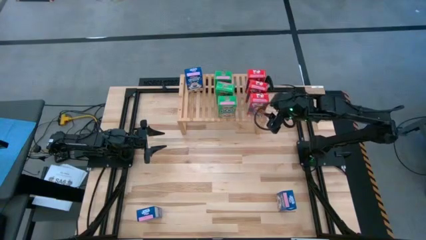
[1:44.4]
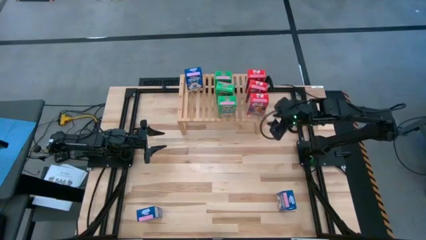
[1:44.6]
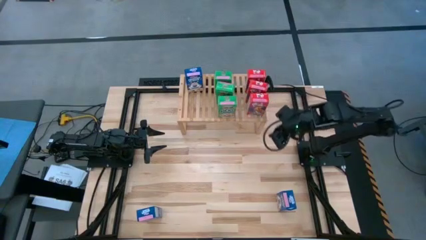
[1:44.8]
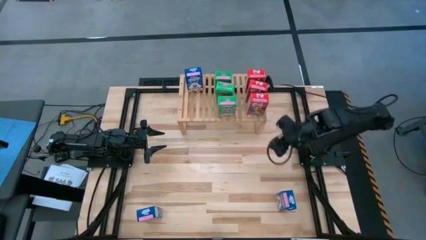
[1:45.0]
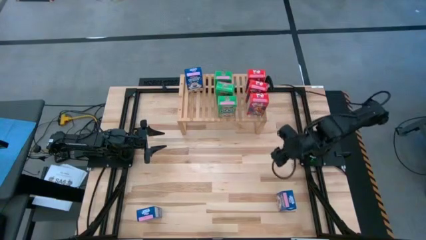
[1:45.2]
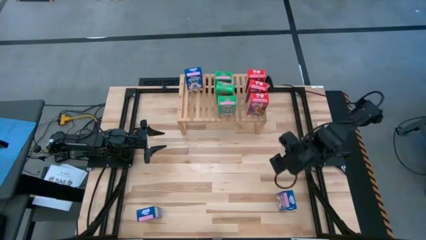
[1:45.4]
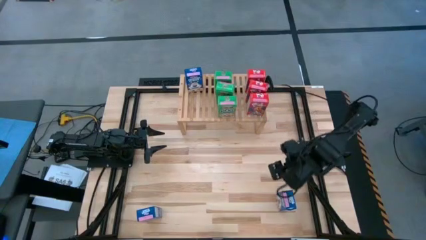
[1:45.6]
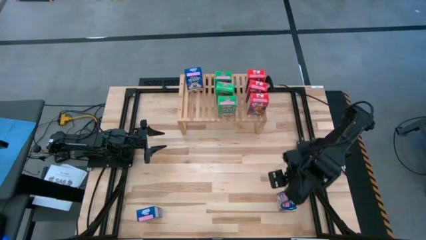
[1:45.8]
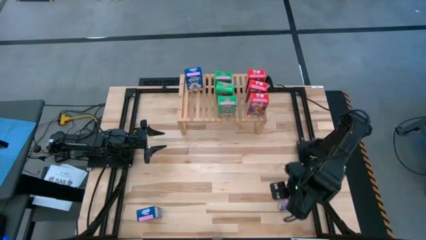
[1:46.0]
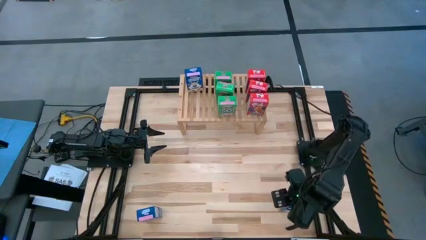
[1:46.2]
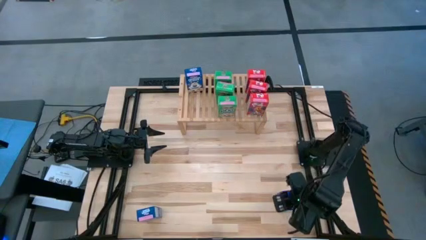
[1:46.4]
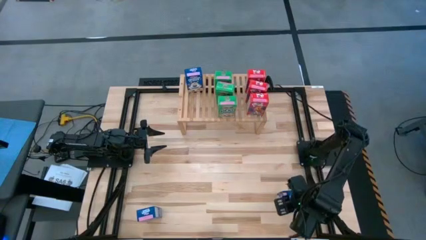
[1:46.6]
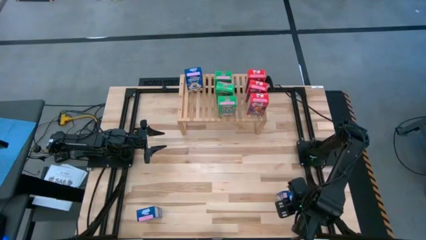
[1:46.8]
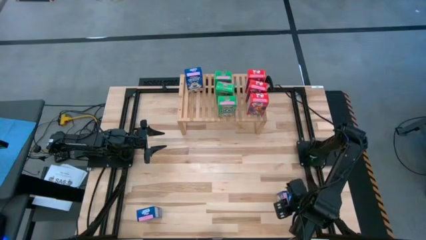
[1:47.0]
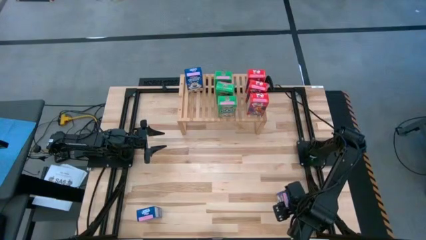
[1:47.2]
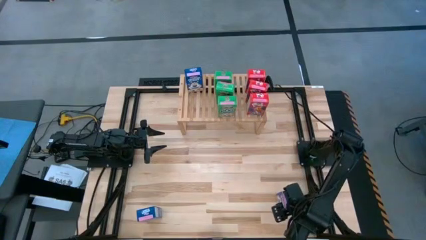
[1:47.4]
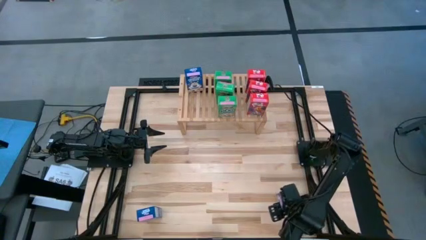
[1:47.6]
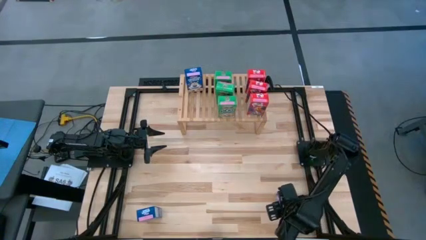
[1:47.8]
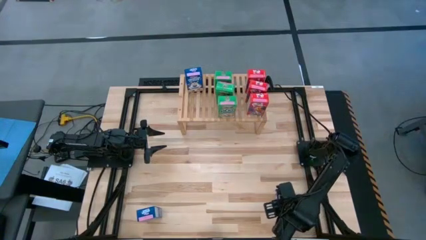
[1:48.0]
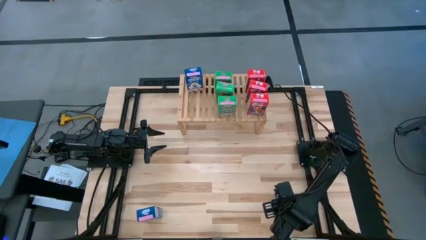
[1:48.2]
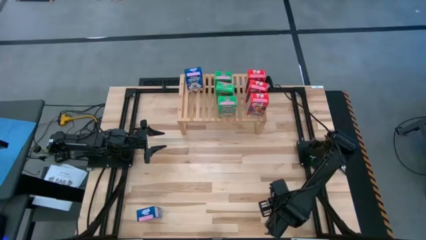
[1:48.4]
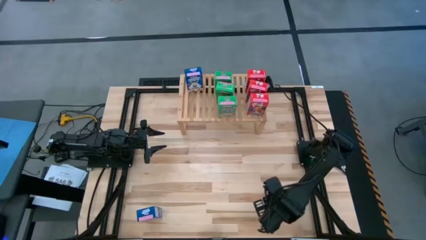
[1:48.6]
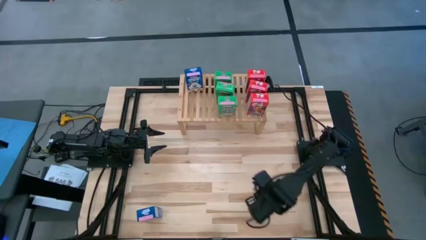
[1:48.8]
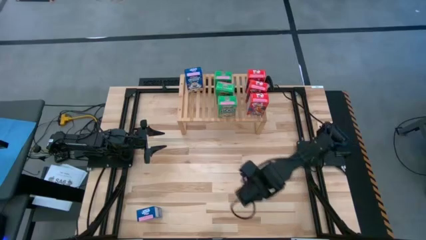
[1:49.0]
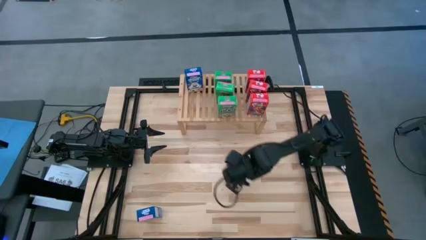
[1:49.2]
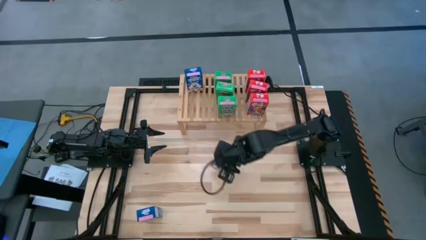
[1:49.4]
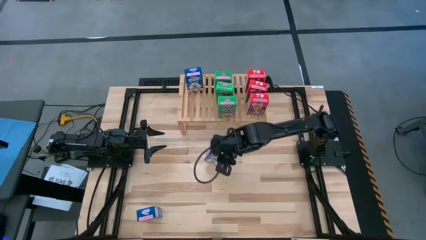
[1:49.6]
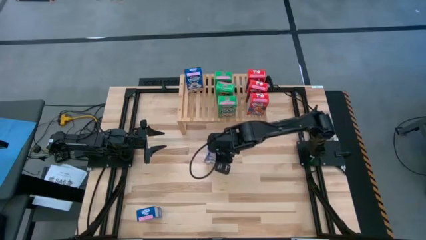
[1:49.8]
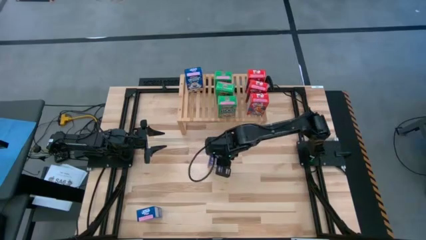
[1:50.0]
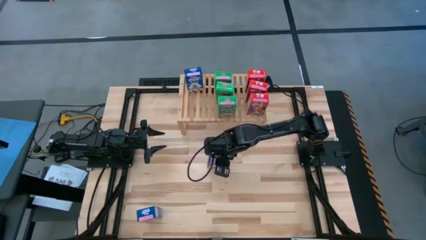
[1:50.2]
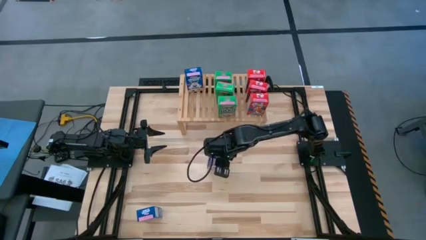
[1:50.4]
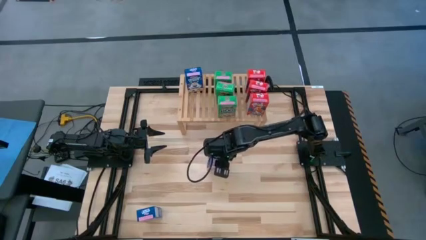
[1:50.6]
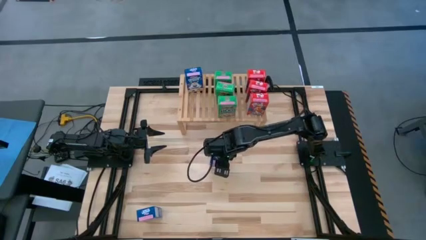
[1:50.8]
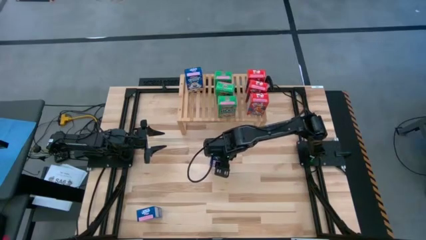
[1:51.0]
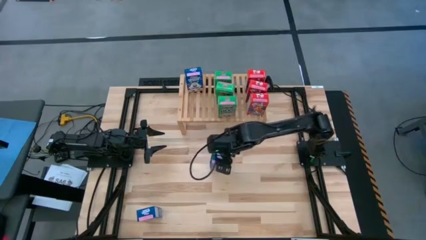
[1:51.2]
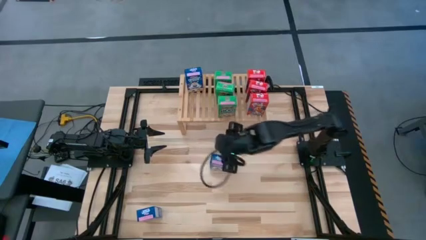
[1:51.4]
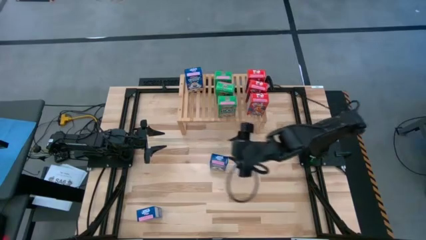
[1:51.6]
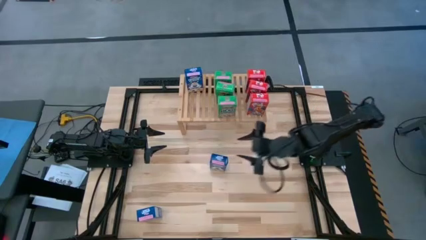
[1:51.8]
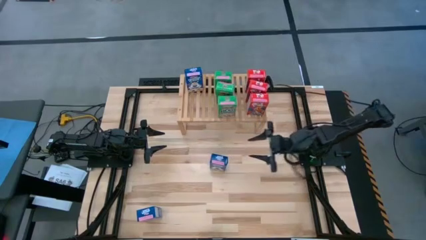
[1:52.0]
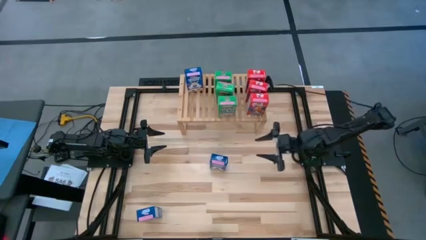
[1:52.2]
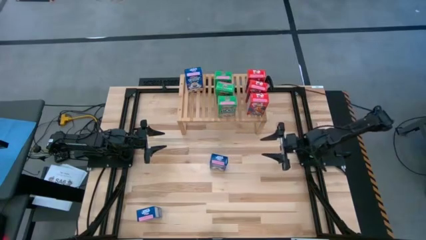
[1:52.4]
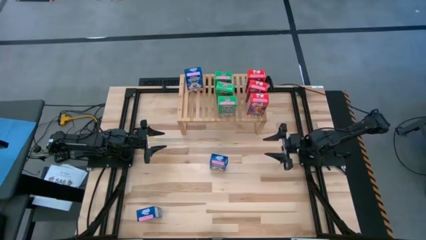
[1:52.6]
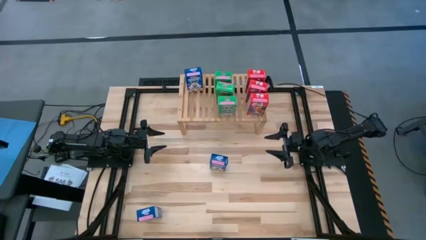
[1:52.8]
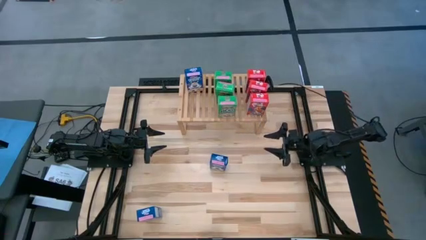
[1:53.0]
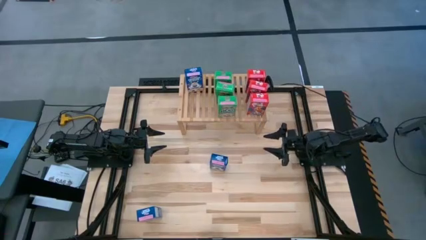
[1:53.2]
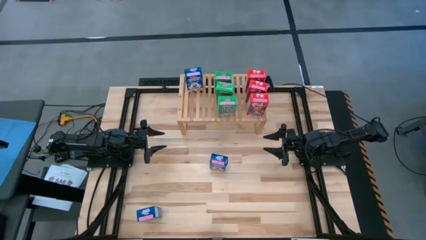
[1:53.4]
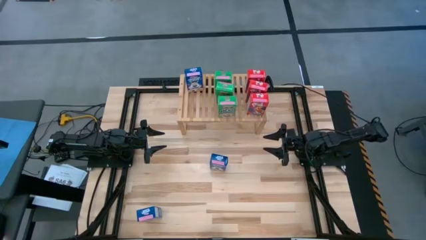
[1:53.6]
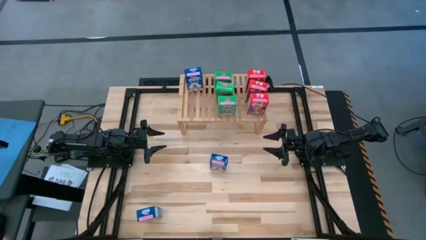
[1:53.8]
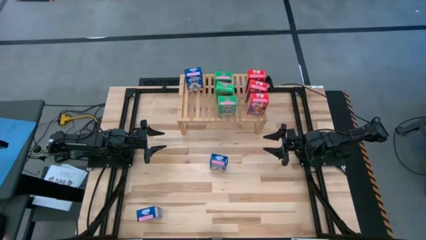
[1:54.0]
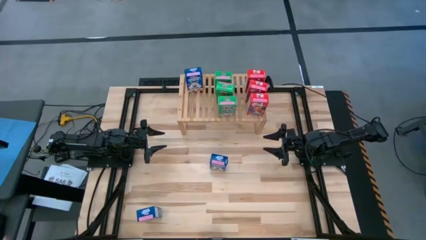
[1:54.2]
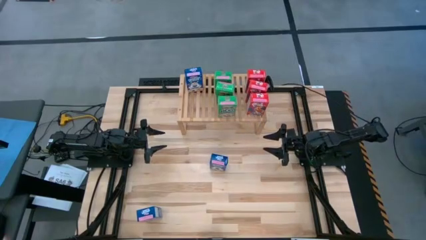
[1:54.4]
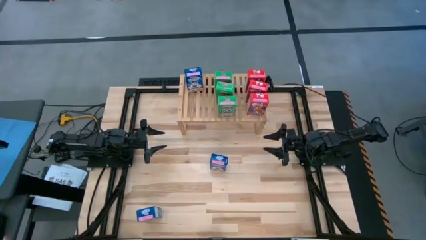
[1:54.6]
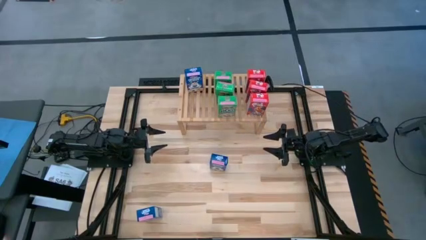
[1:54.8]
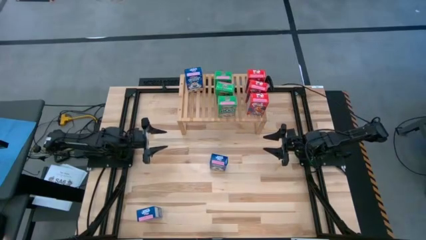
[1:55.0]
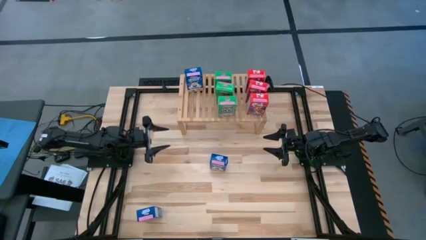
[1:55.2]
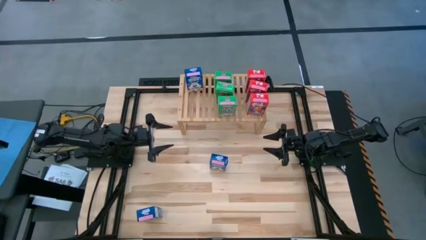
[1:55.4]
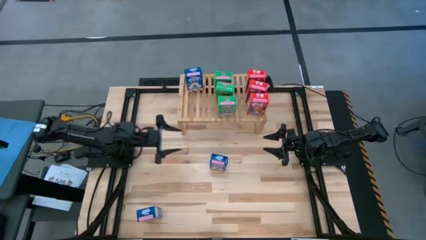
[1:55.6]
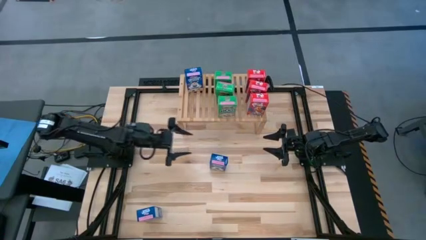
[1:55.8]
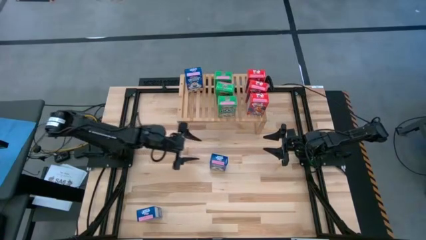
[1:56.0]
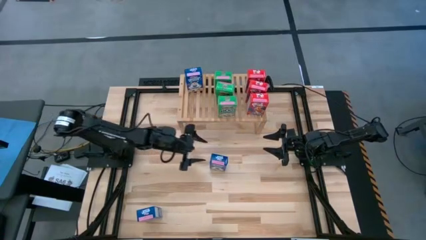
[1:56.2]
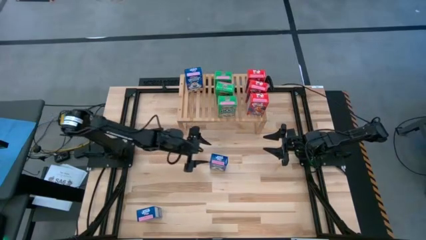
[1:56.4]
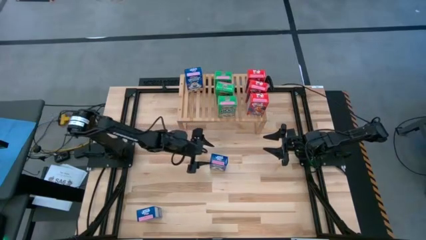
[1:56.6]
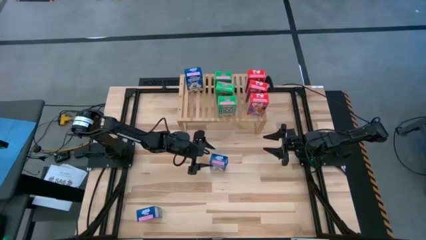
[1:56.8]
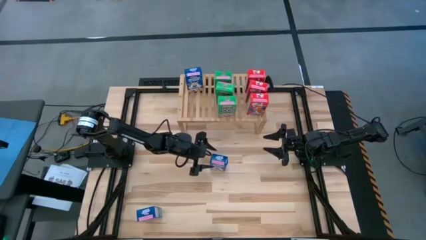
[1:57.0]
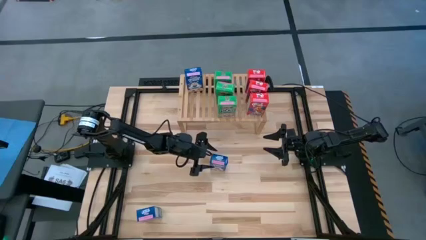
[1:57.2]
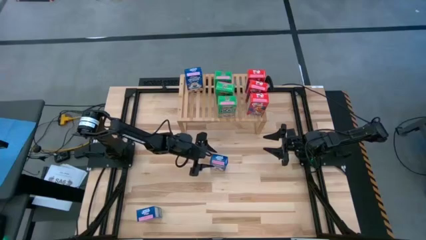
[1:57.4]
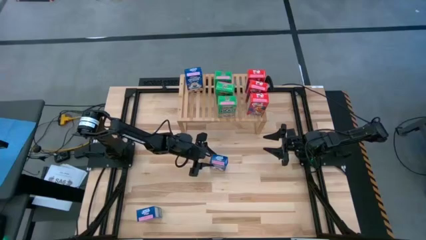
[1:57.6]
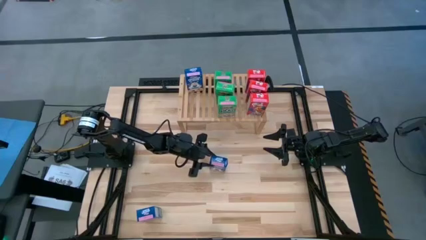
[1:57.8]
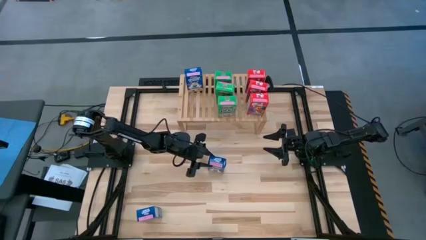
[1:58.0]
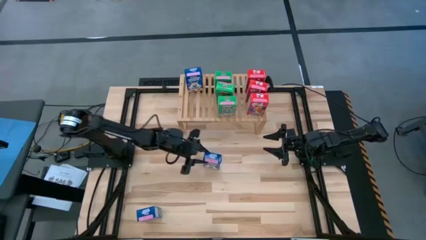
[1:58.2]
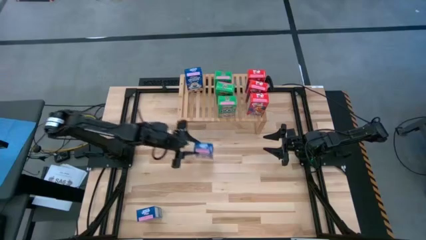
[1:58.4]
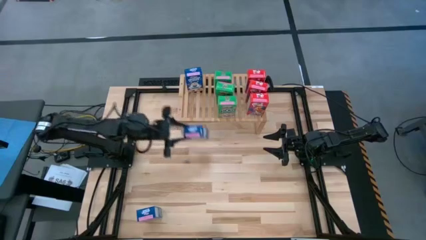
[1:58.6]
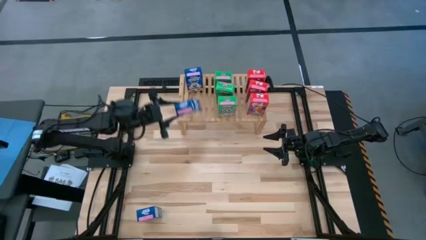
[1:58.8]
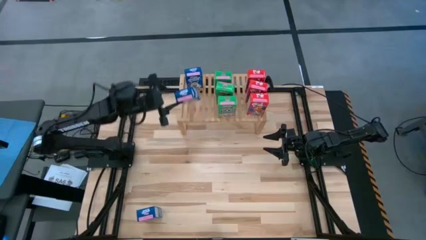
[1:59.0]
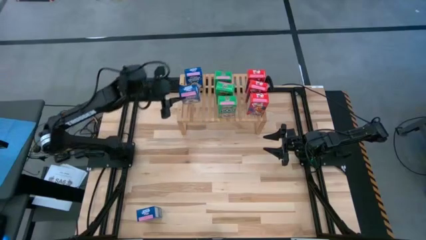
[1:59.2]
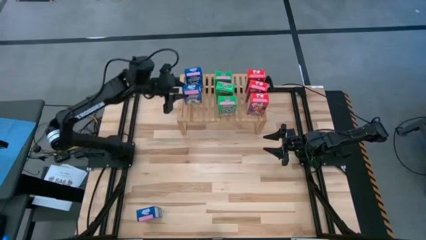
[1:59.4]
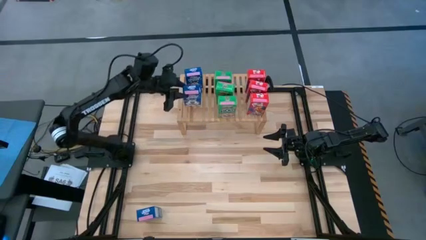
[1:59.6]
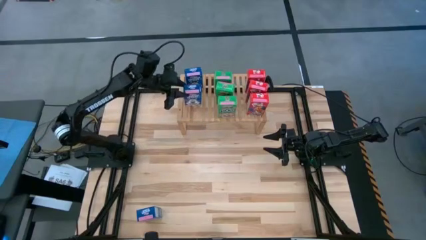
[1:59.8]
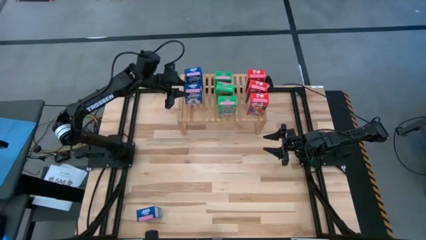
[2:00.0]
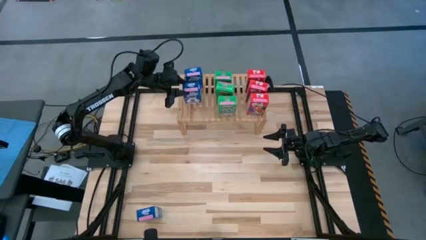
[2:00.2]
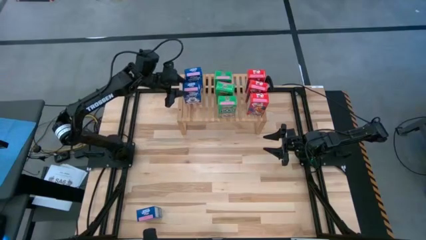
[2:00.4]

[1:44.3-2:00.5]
Task: Stack cereal on shelf
Put the right blue cereal box on the shelf aligned with the other blue cereal box

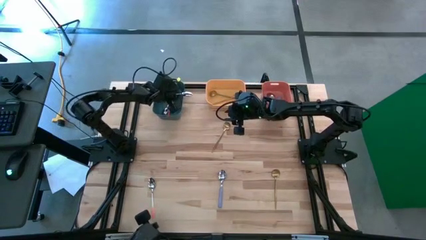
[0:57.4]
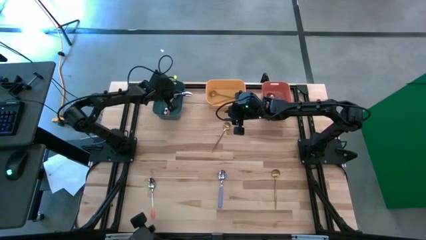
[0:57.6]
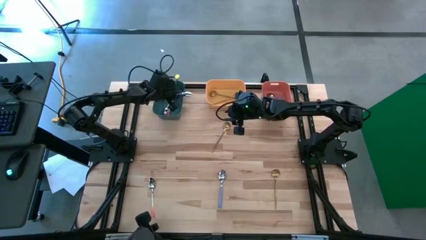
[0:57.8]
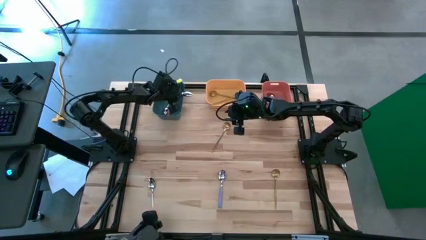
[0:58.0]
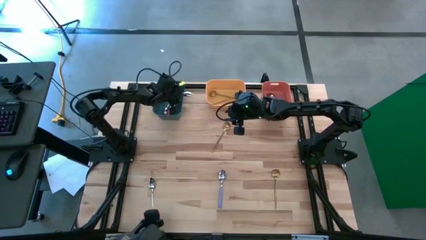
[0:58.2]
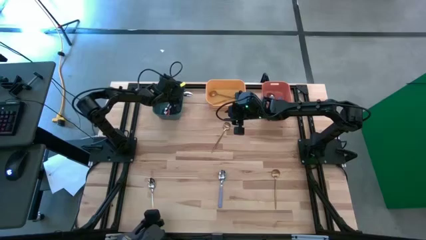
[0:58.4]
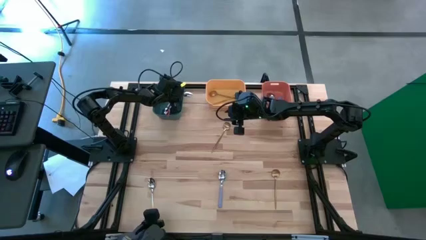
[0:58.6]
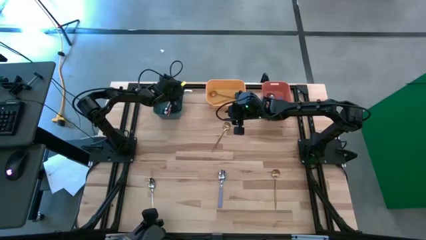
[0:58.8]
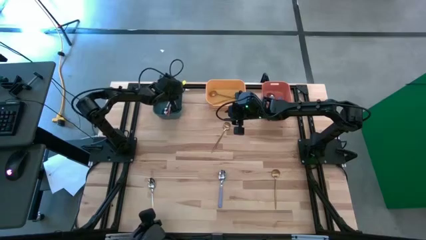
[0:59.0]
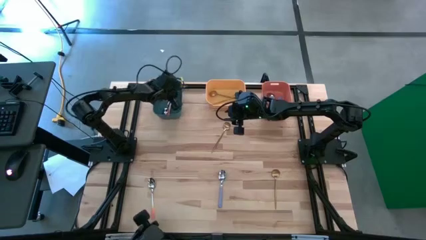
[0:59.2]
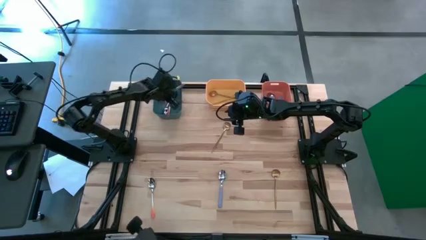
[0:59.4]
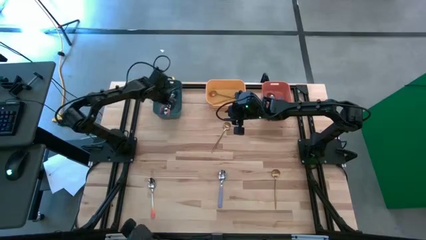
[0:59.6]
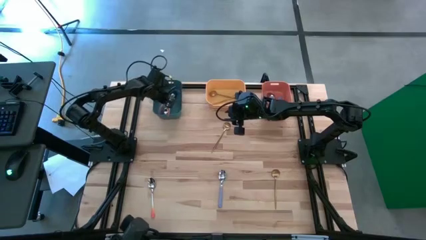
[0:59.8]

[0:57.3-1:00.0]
Task: Sort silverware by color (type)
Put the right orange spoon into the blue bin
